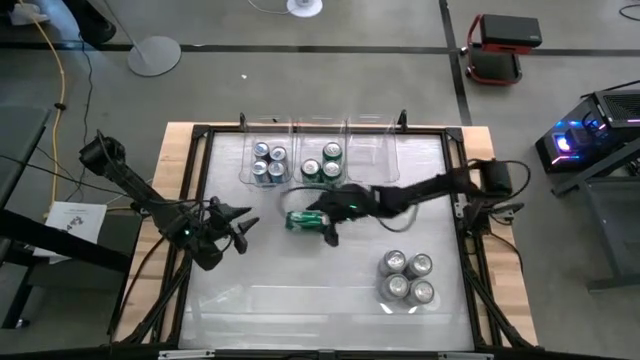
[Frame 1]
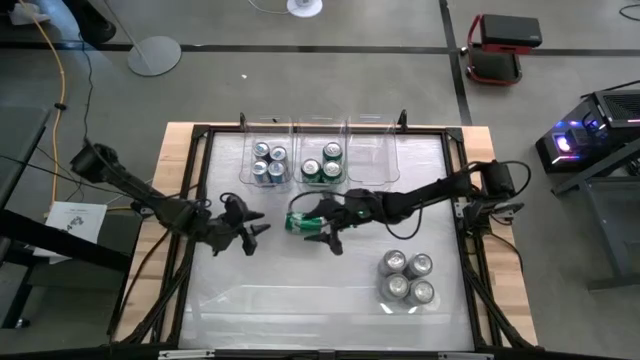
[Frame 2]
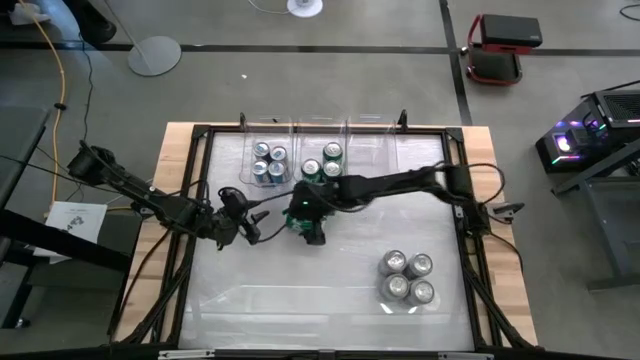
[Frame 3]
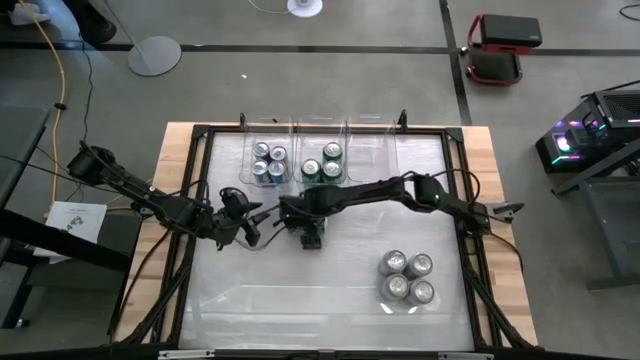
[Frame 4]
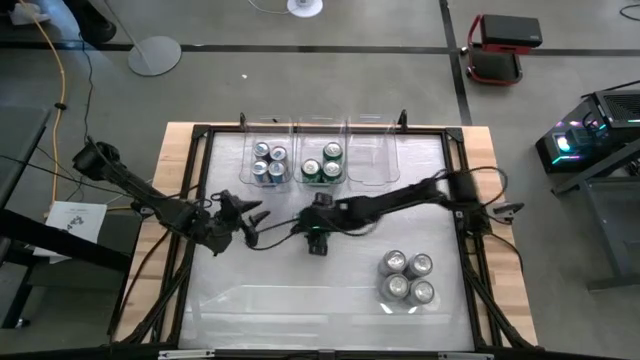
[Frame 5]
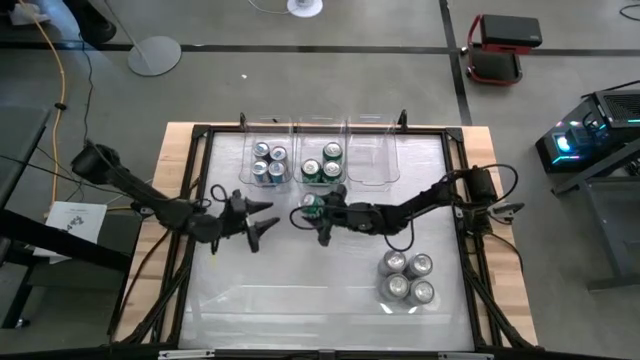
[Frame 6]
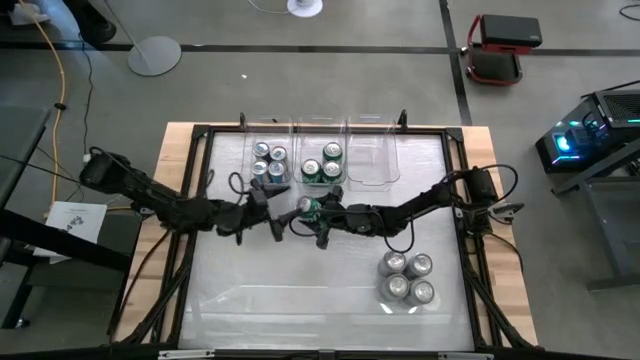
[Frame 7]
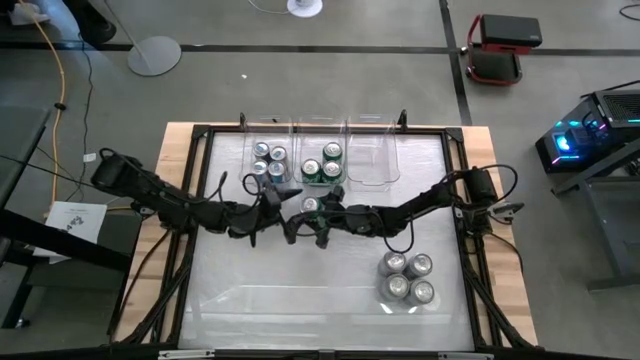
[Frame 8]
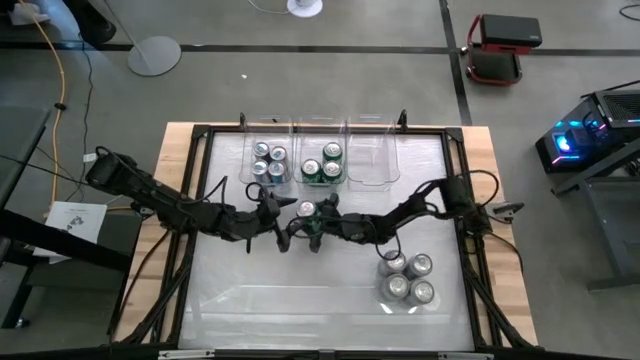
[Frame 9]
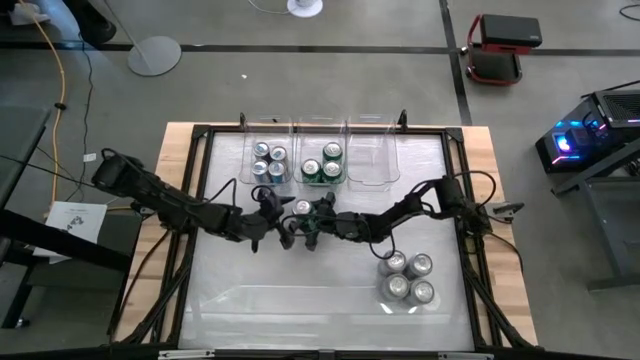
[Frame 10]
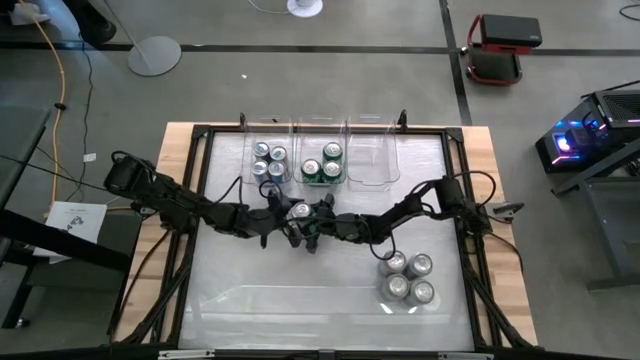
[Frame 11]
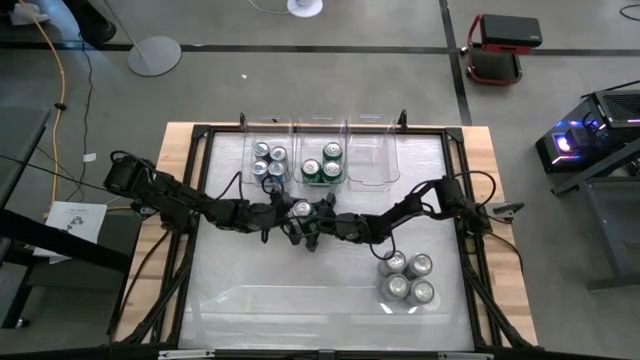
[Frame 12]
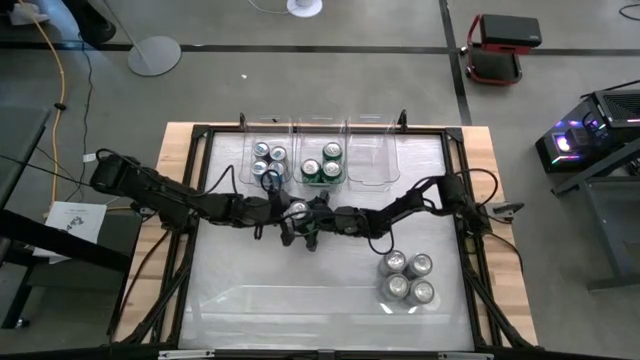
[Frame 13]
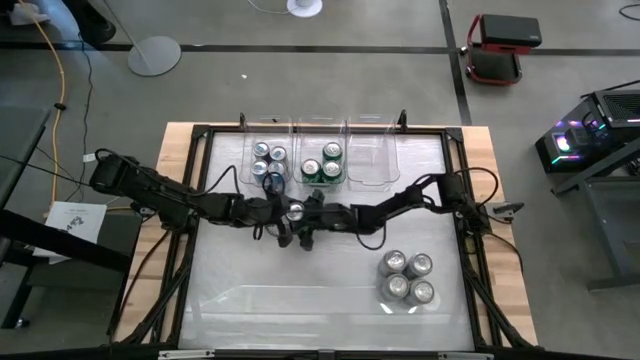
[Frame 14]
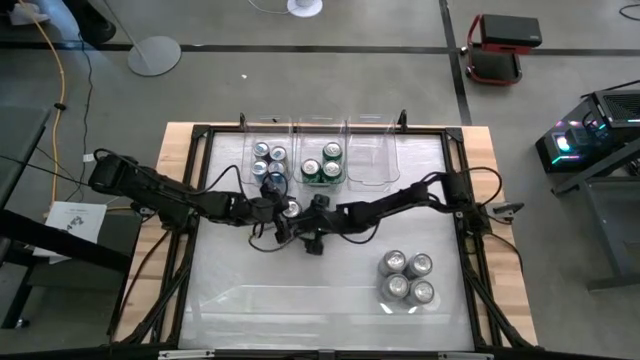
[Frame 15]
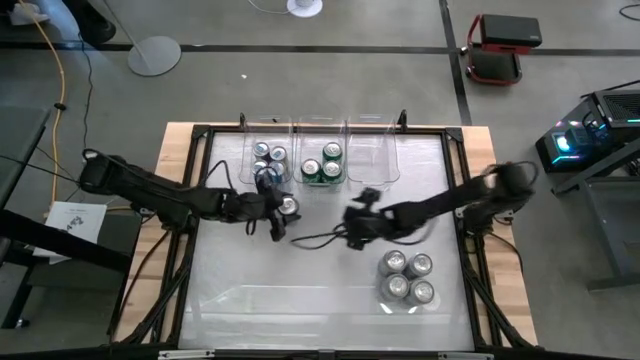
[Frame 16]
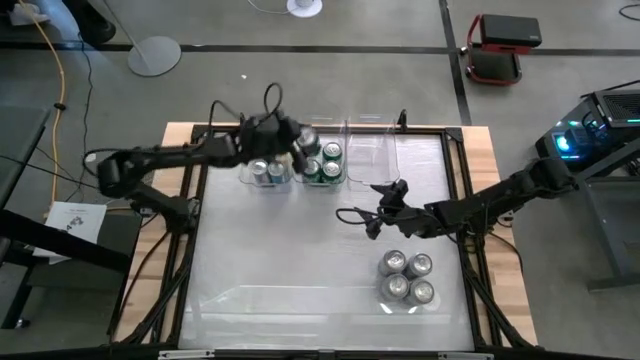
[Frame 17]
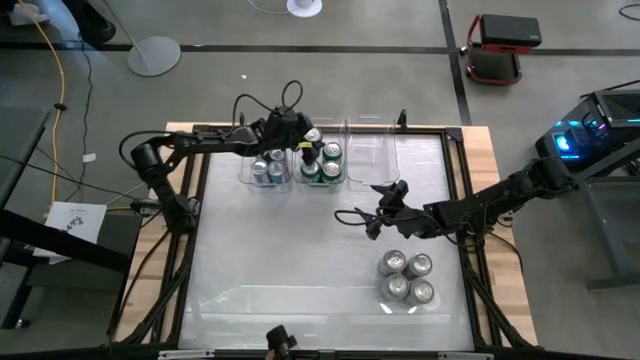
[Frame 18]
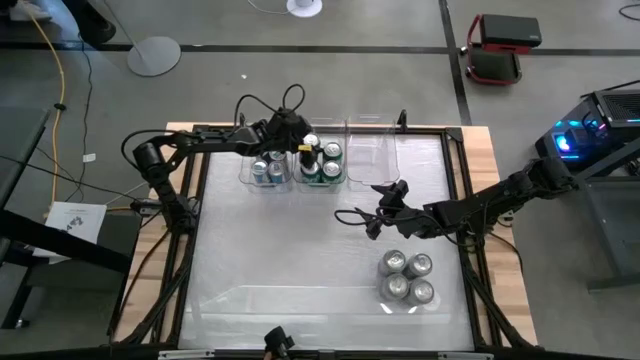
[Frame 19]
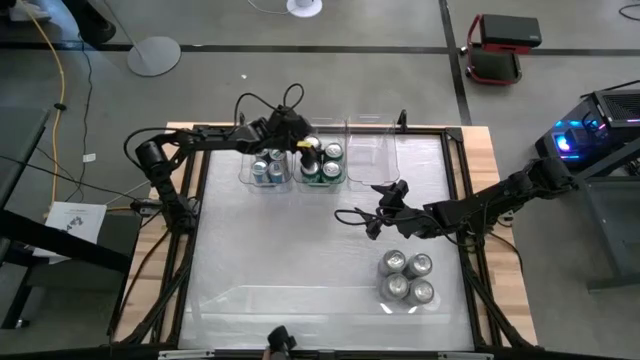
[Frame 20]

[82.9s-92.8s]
Task: Sort soda cans
Put the green soda can into the center transparent bin

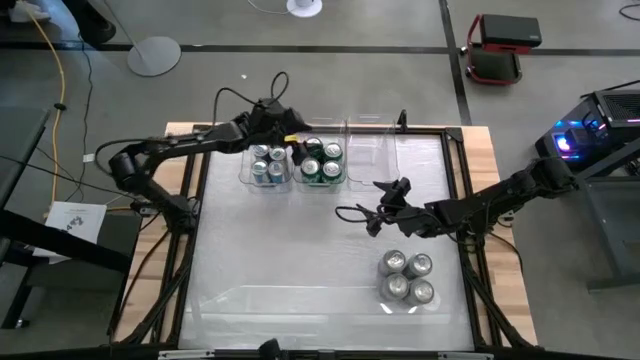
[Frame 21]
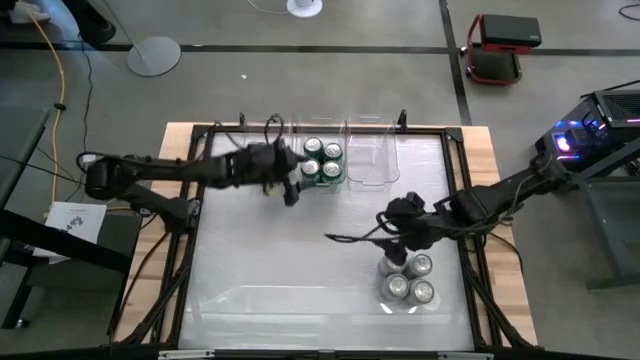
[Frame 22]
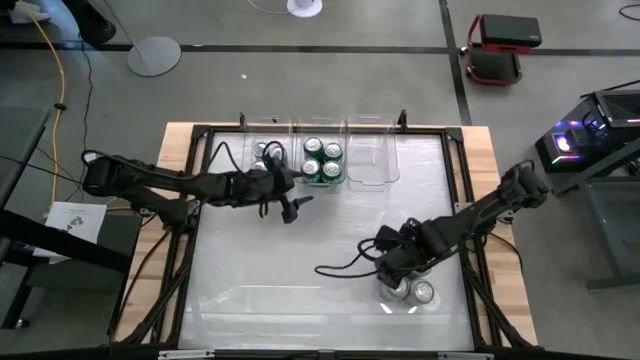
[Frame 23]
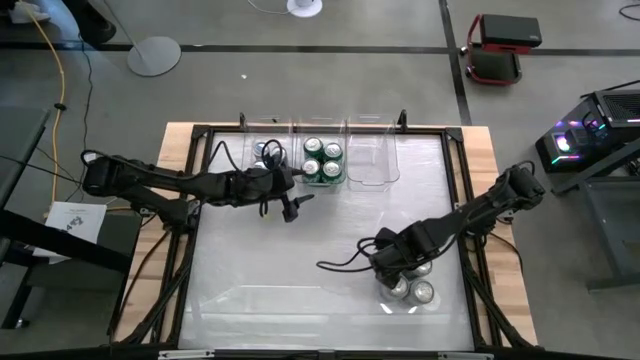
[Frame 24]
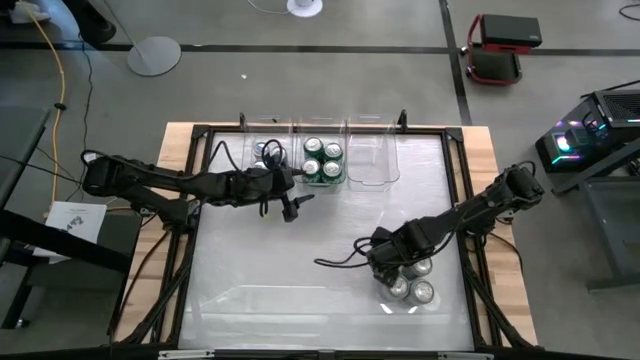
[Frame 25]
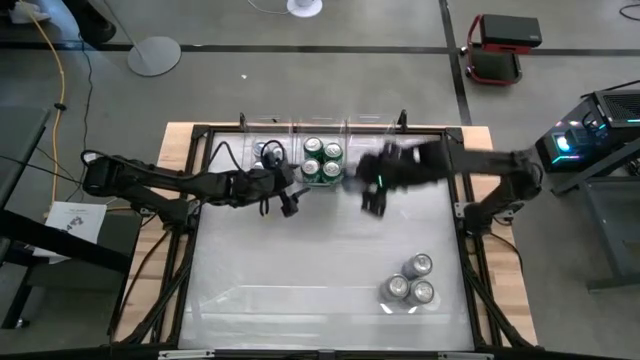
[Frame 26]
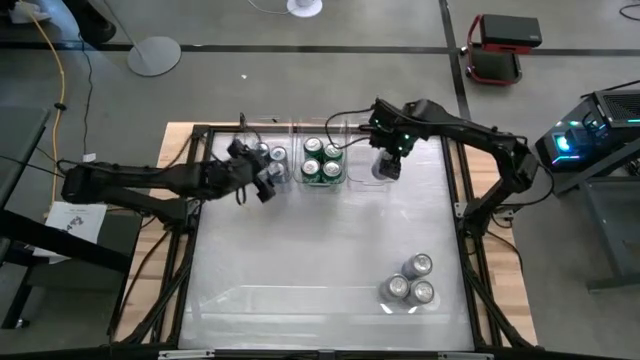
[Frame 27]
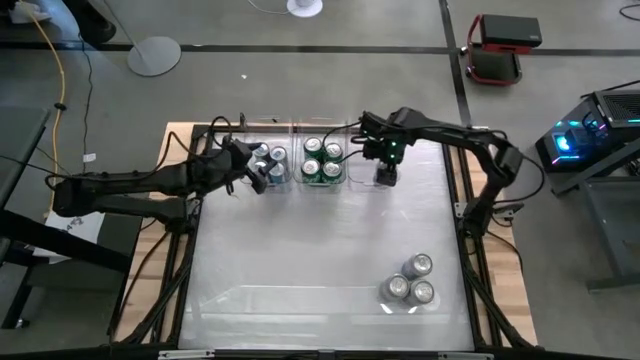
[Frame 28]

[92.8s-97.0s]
Put the top left blue-white soda can into the right transparent bin

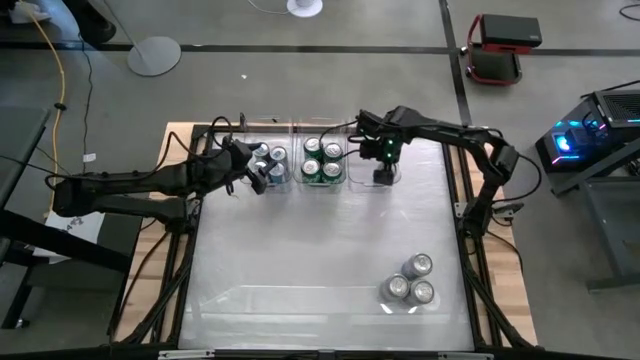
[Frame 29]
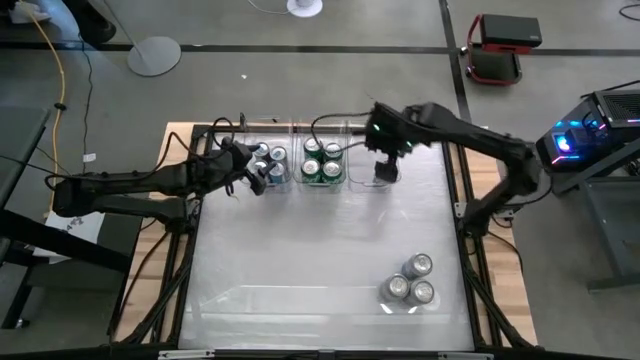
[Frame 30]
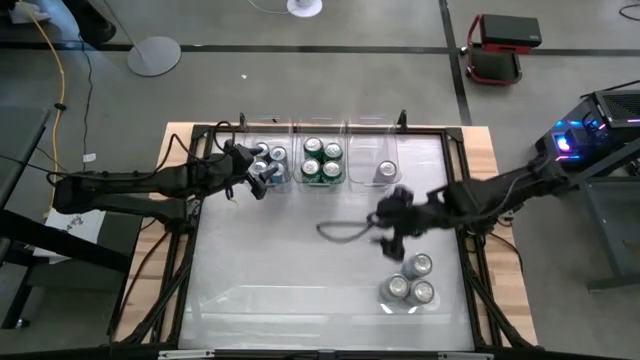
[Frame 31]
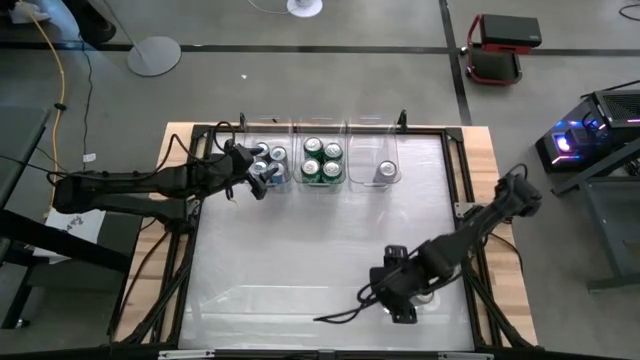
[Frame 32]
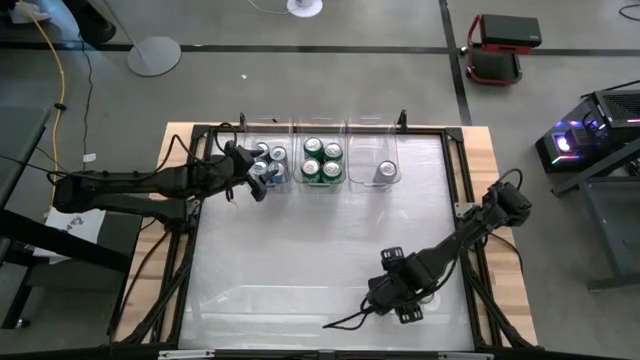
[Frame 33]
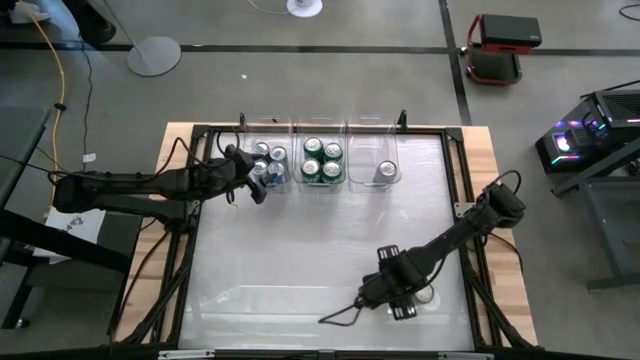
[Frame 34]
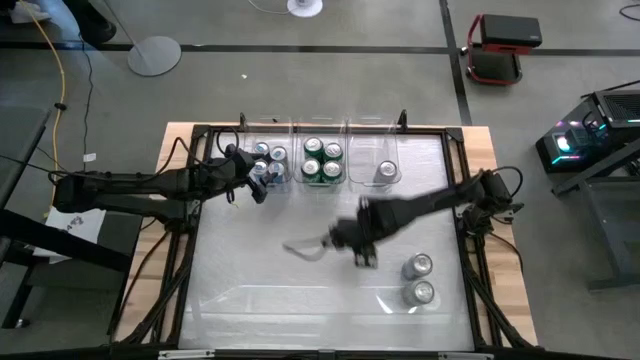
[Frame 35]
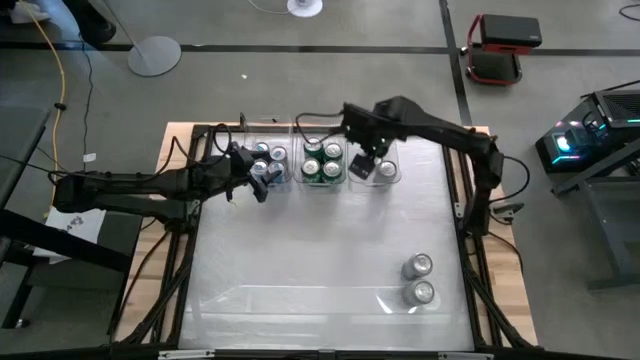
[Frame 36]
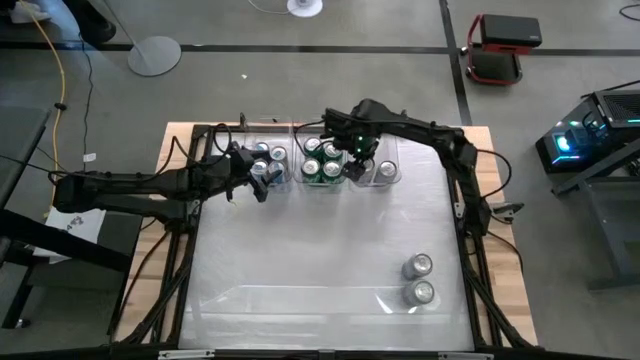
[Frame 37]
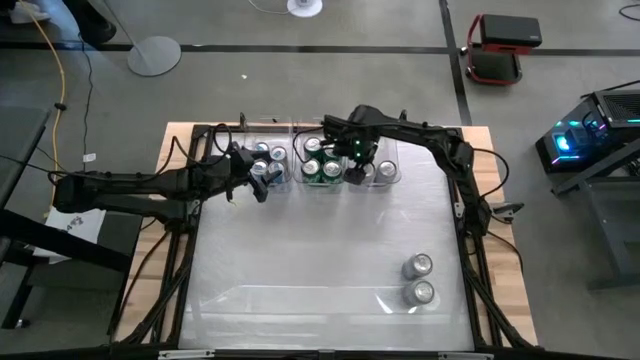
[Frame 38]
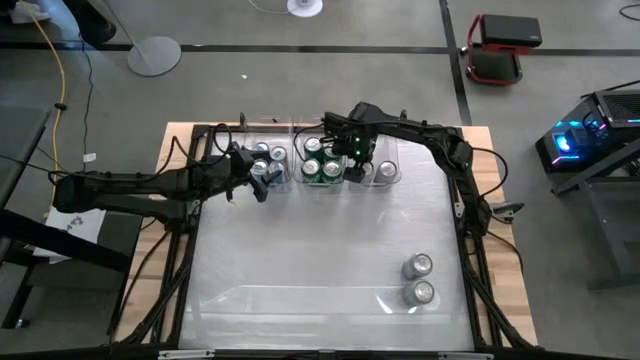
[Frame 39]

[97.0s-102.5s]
Put the bottom left blue-white soda can into the right transparent bin

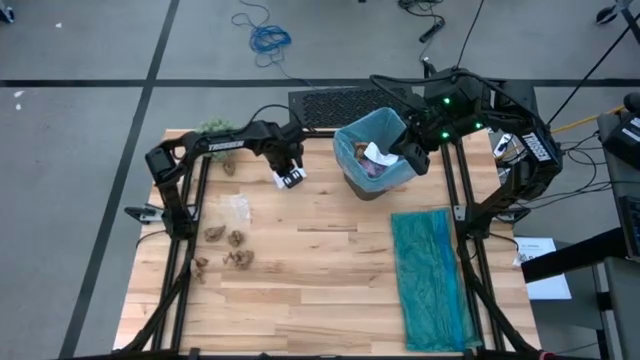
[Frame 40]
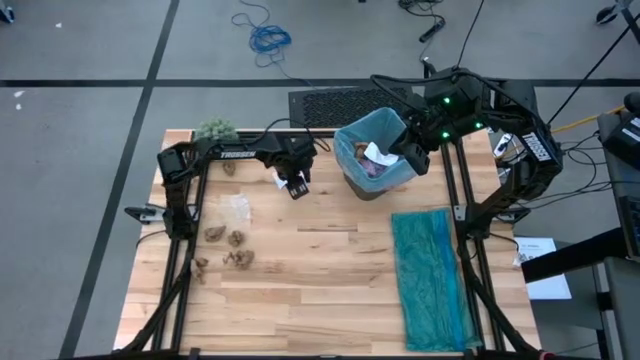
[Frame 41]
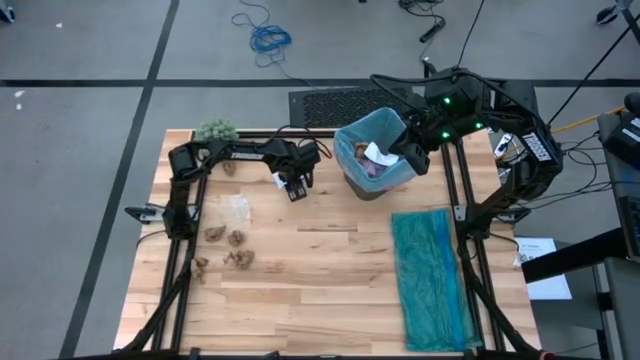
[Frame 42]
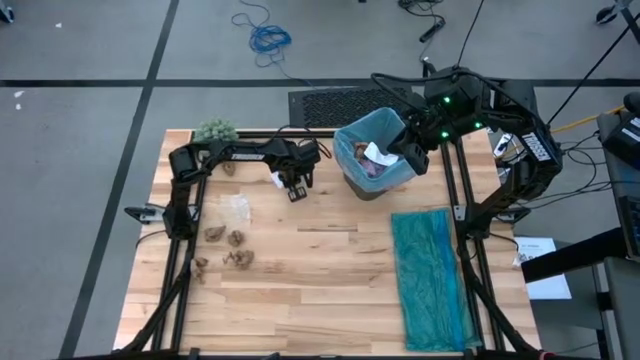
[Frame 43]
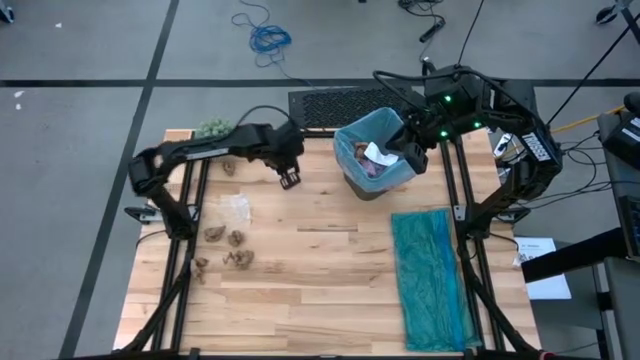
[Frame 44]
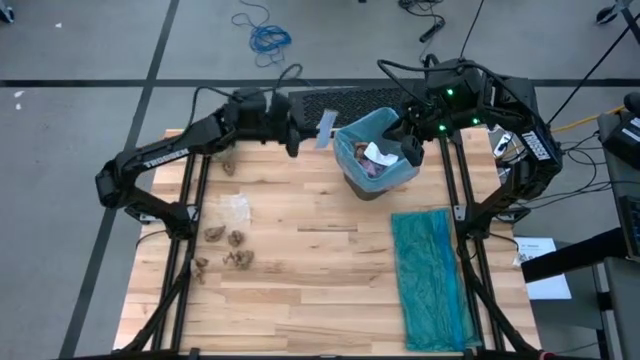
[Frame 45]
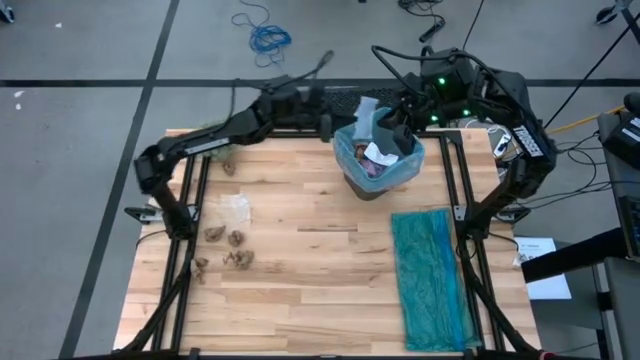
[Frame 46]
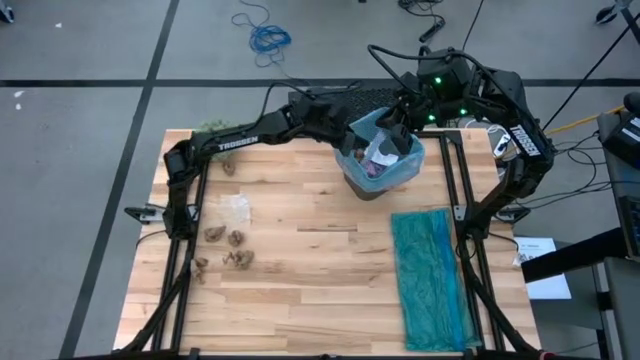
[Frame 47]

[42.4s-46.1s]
Task: place trash/remove bag and relplace
Put the white paper into the trash bin
